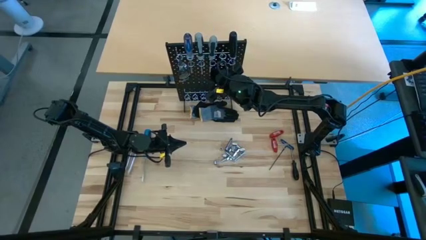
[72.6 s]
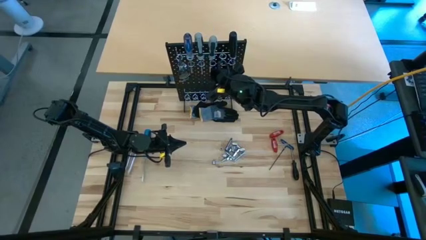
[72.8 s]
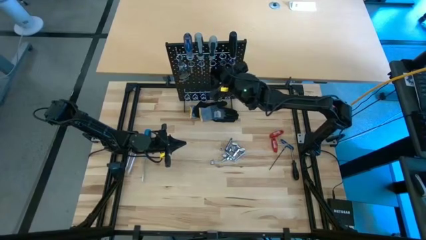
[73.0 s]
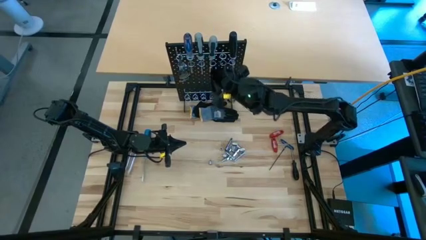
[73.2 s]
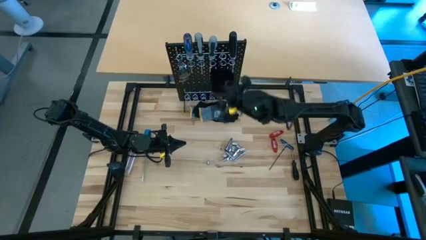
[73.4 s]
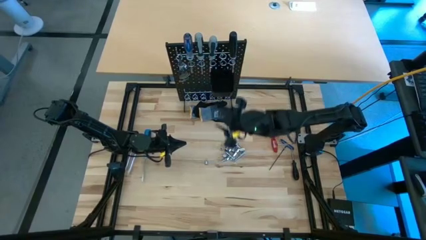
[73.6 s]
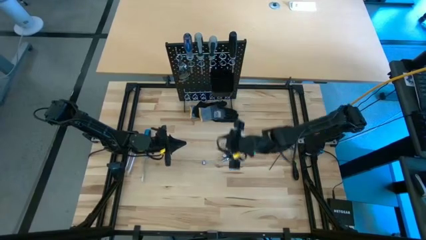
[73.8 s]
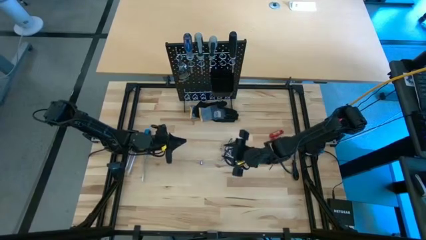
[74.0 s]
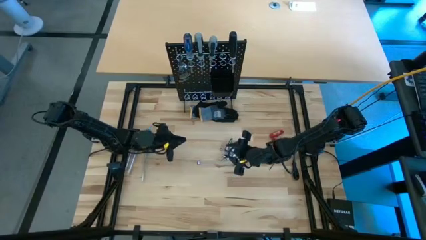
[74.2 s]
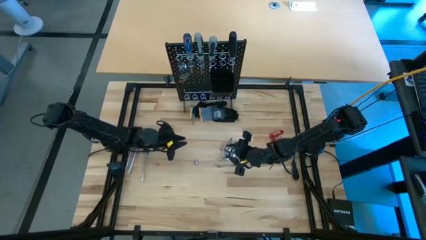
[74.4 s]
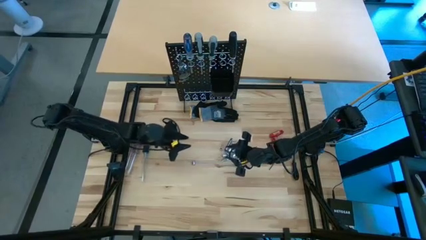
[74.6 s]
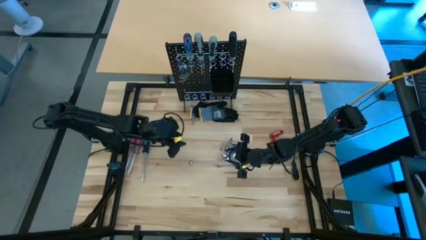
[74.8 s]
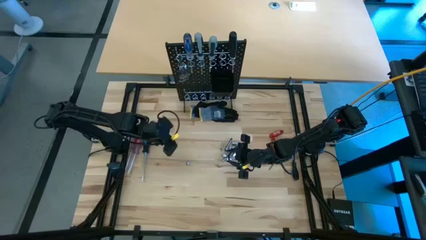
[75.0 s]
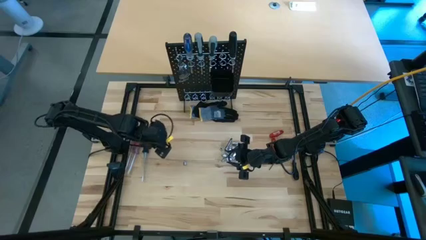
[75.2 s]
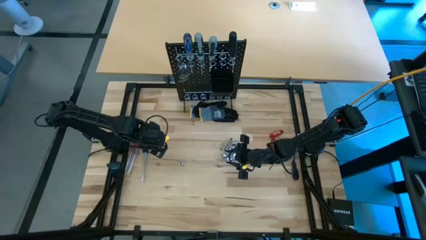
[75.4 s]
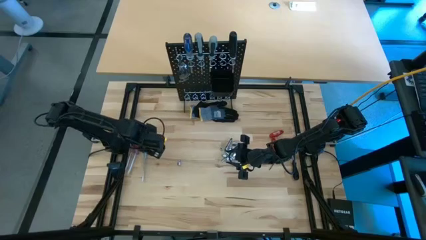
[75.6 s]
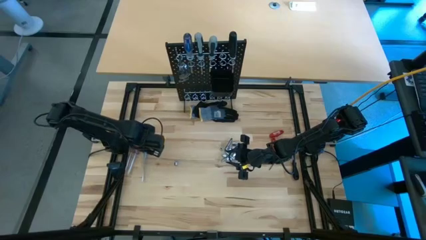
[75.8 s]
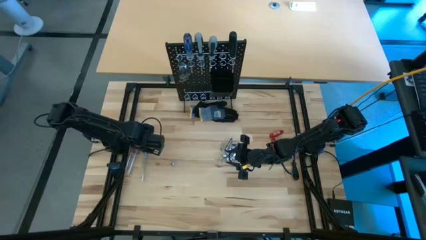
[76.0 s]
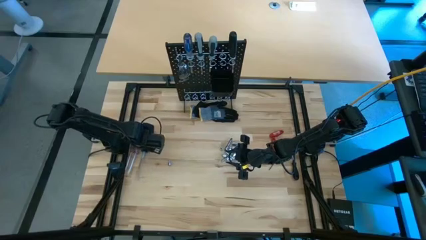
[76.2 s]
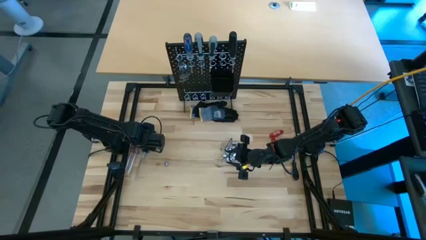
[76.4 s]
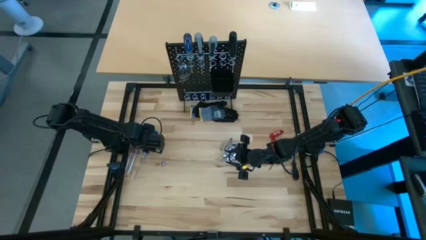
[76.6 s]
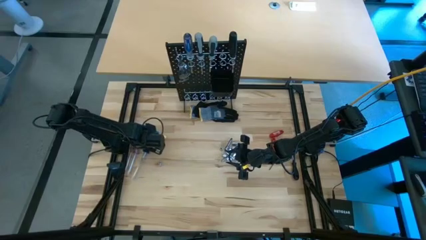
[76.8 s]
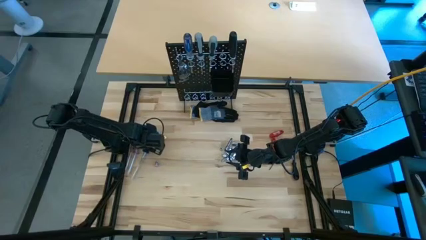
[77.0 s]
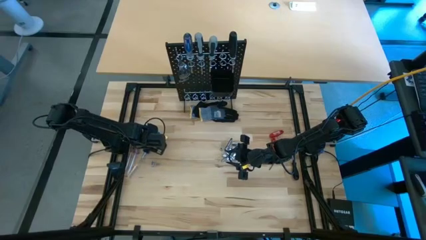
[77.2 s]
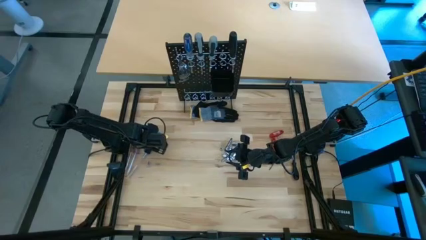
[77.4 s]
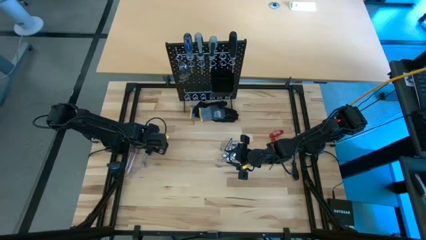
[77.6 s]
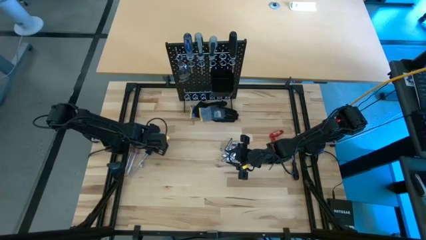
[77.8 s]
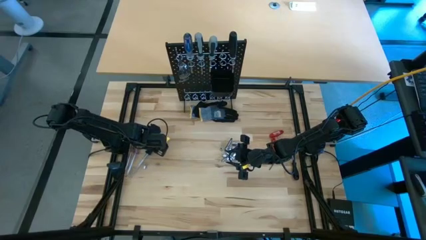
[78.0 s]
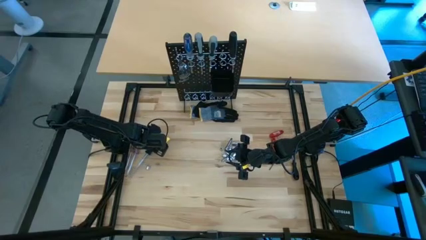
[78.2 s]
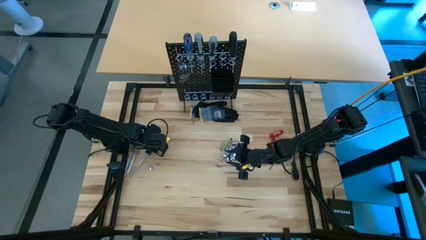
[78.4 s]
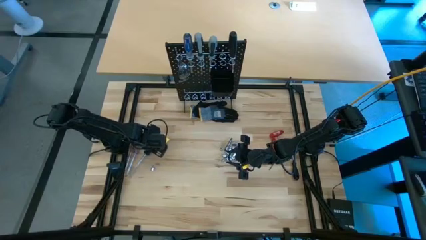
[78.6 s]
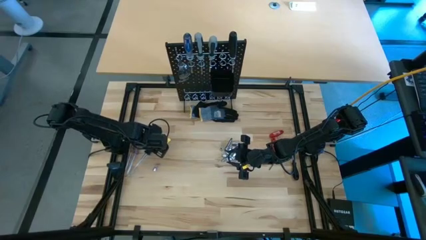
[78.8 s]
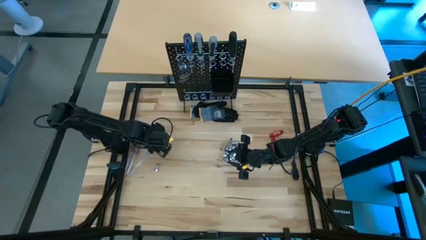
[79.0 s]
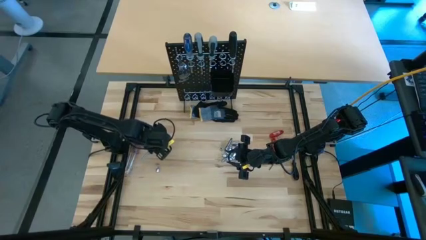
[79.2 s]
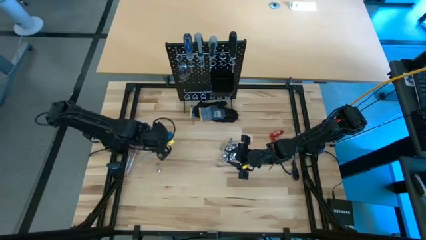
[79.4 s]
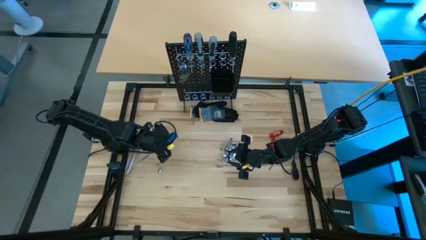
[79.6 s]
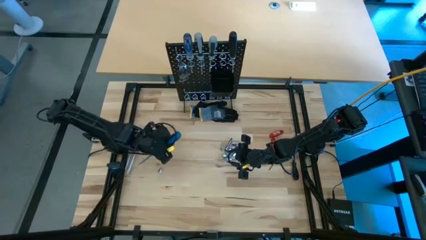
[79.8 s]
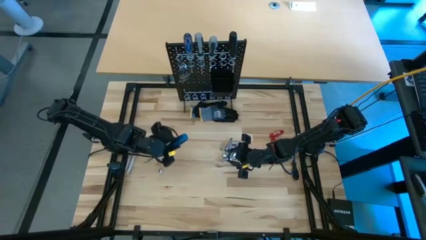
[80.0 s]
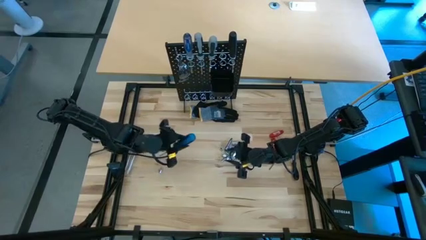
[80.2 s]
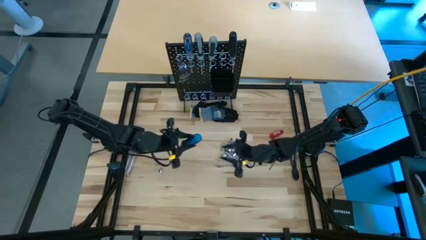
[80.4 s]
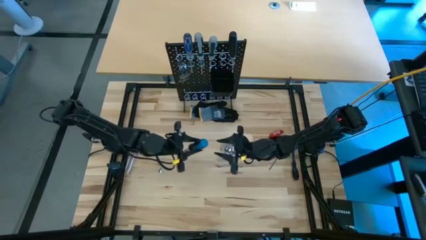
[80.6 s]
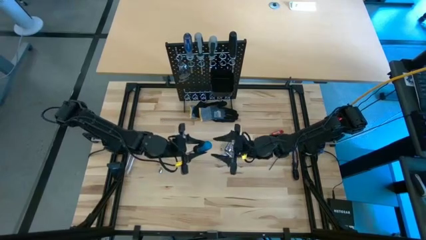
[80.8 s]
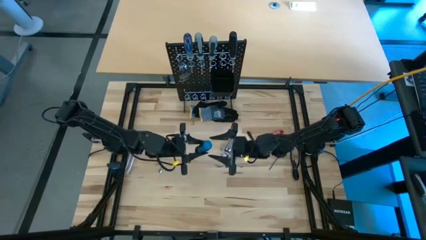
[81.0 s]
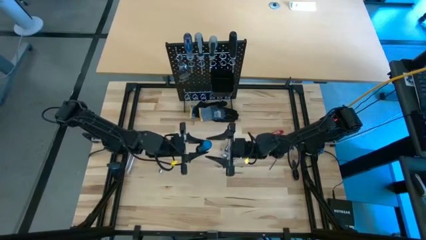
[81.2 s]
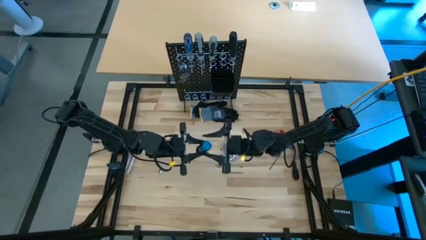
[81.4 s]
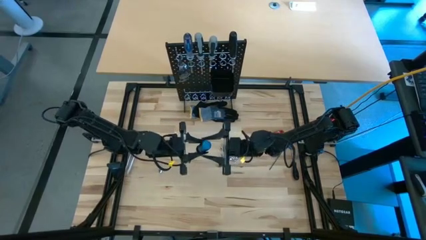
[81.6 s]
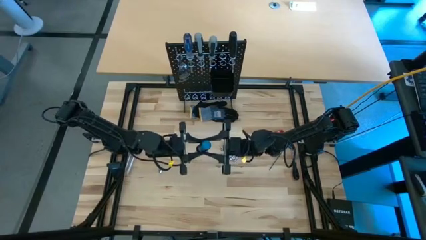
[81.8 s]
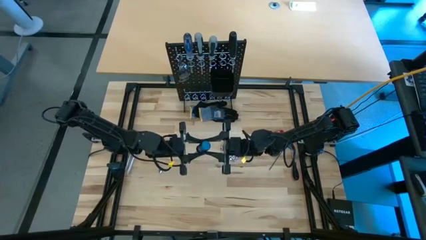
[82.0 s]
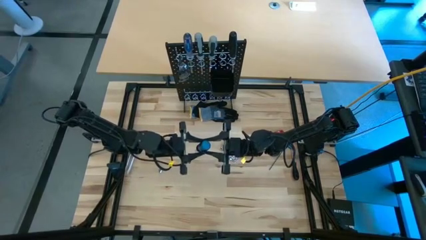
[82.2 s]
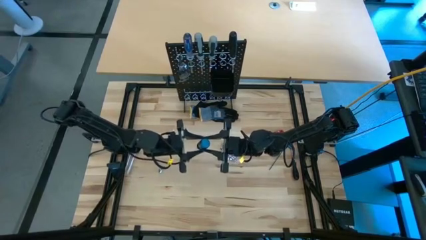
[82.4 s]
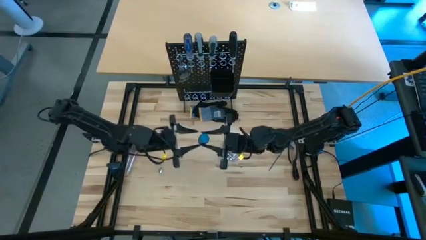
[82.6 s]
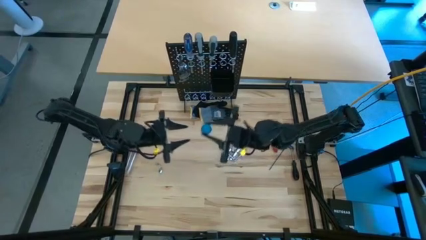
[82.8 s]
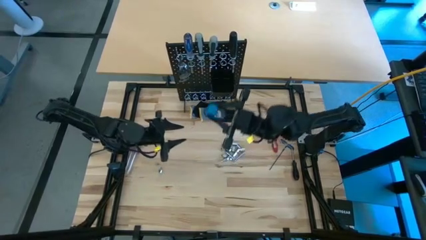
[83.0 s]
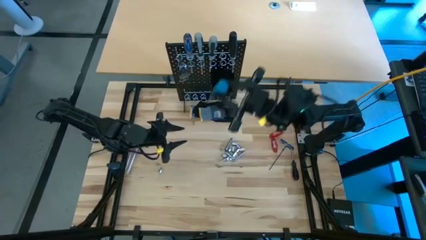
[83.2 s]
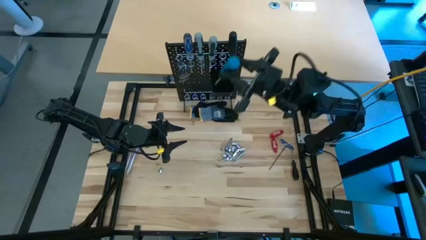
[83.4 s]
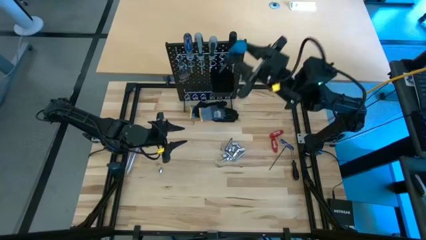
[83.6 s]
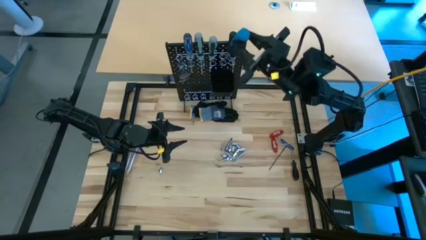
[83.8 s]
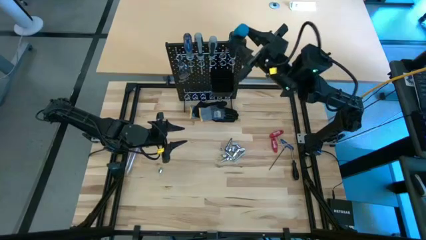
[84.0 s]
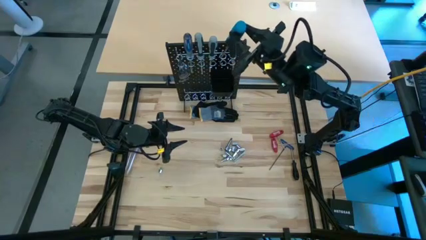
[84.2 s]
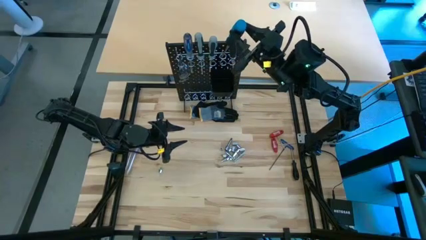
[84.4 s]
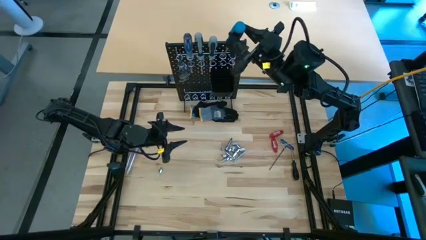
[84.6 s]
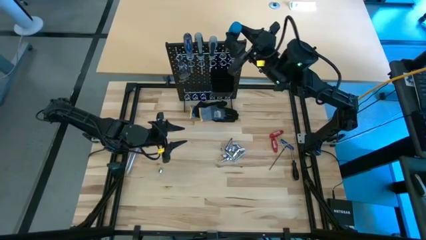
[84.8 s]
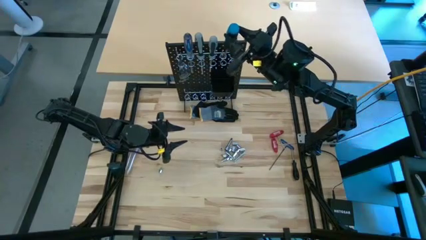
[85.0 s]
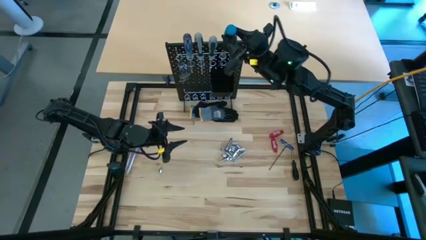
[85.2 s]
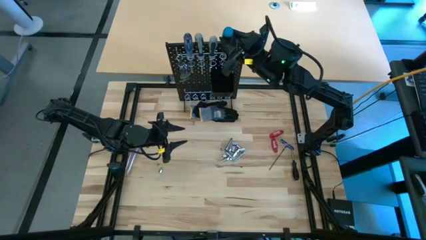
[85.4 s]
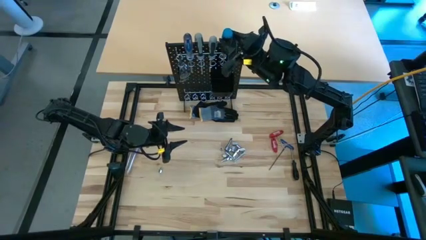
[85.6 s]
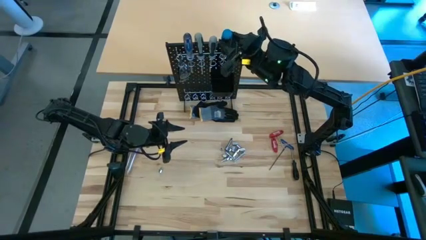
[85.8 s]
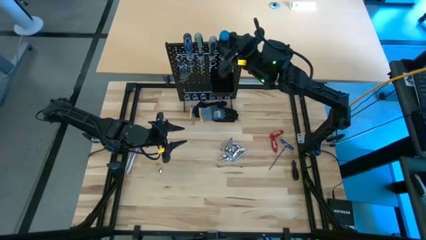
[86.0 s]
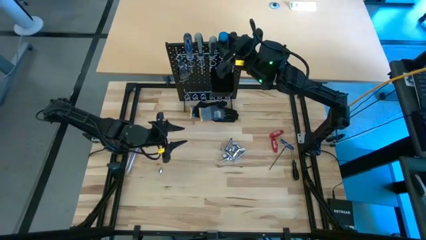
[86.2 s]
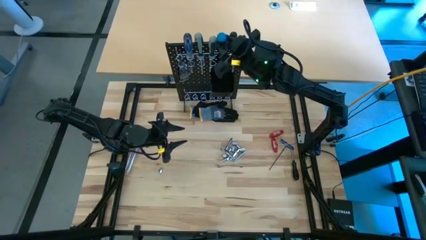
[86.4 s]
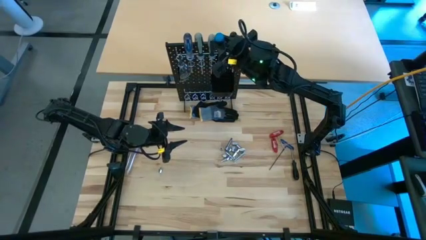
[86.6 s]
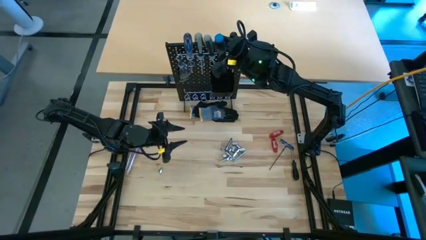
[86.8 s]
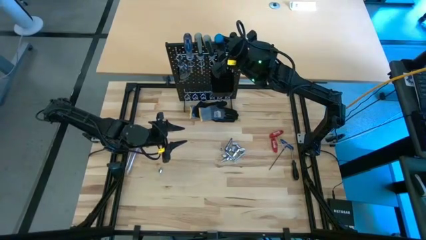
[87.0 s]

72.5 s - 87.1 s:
Task: Hang tools onto peg board
Hang the dark blue screwdriver on the pegboard

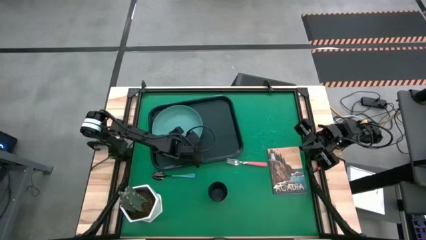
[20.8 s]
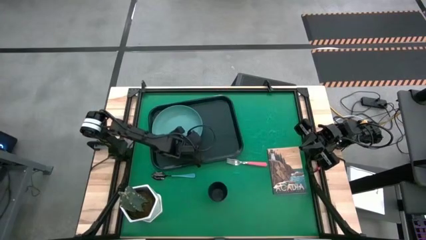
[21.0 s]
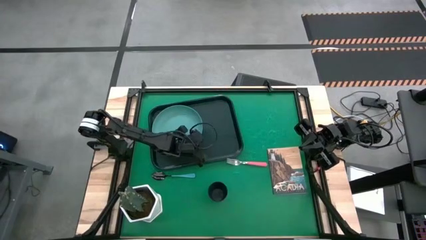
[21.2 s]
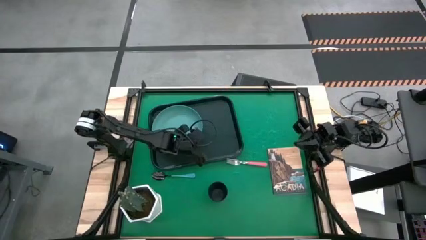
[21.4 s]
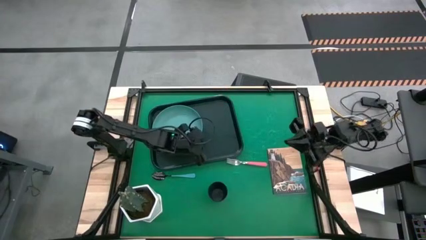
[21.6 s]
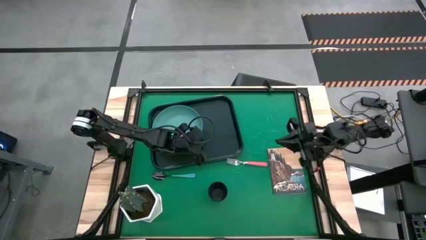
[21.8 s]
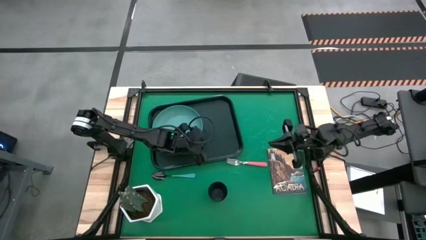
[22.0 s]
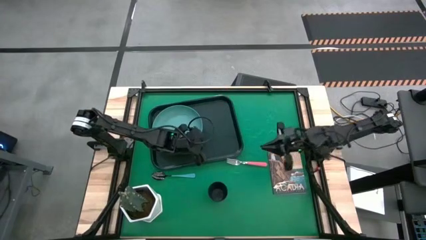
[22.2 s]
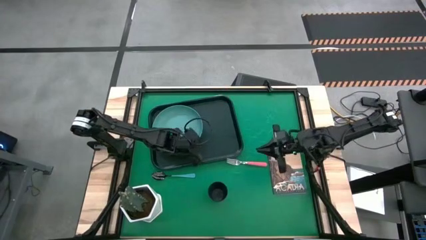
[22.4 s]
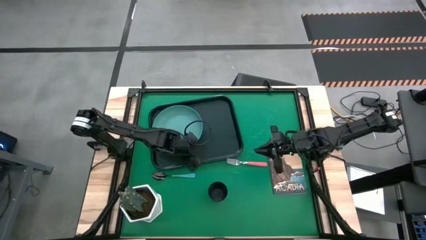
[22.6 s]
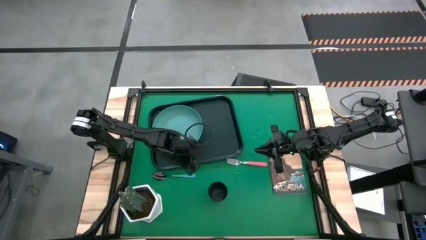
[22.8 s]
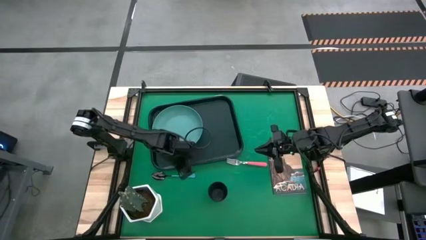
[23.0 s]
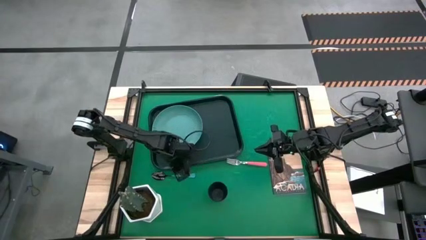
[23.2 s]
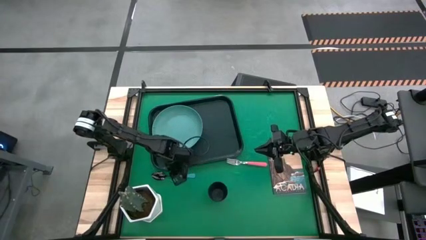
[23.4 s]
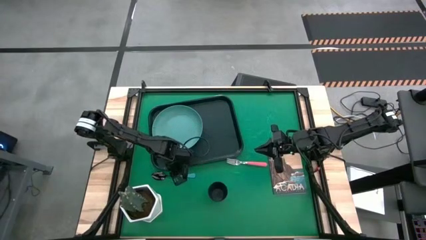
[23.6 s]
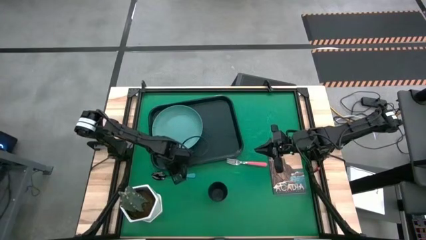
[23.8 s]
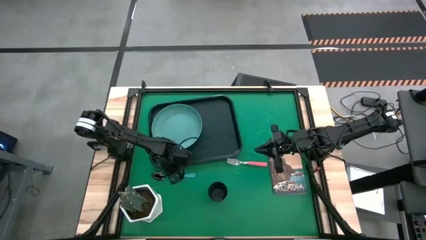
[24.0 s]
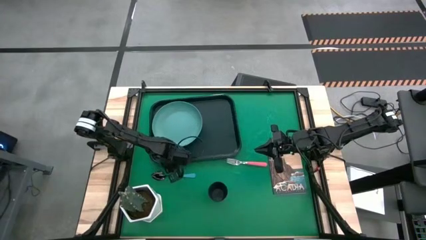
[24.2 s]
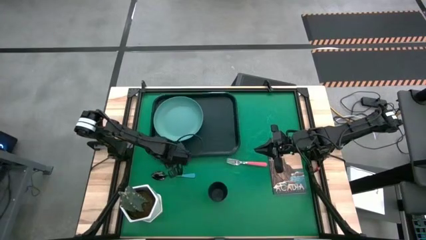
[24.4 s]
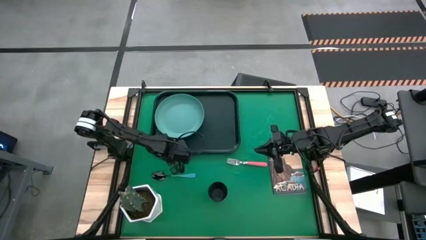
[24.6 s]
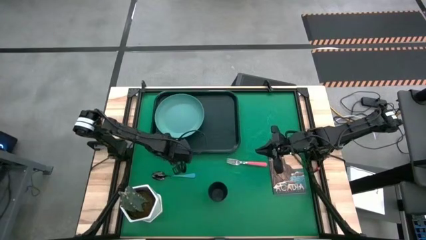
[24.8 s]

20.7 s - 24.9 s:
Task: Pick and place plate/cup/fork/spoon on tray
Adjust the black tray
